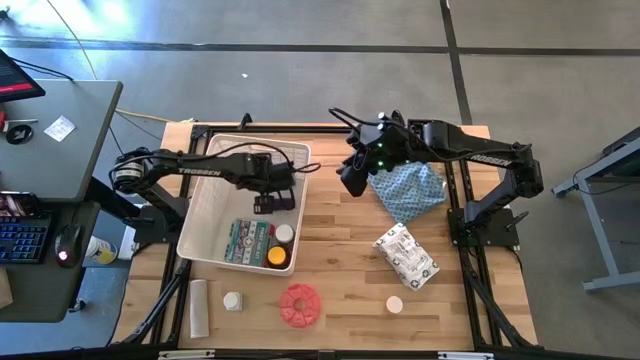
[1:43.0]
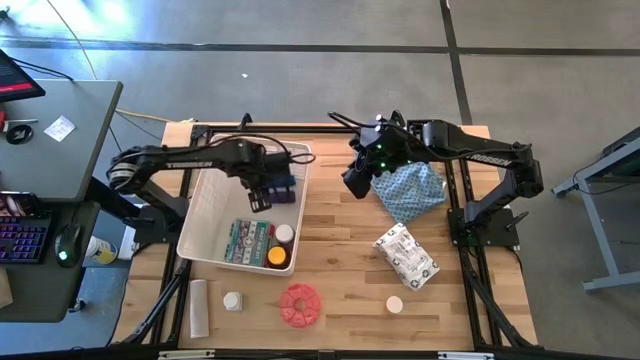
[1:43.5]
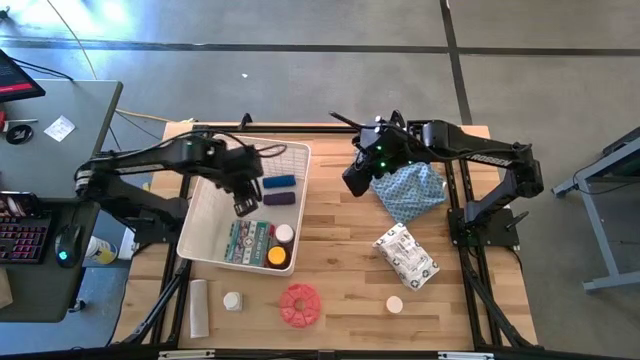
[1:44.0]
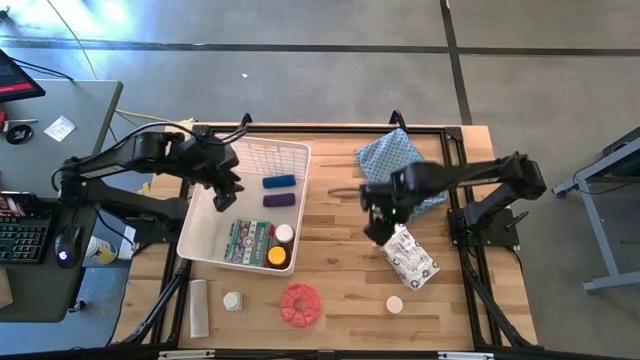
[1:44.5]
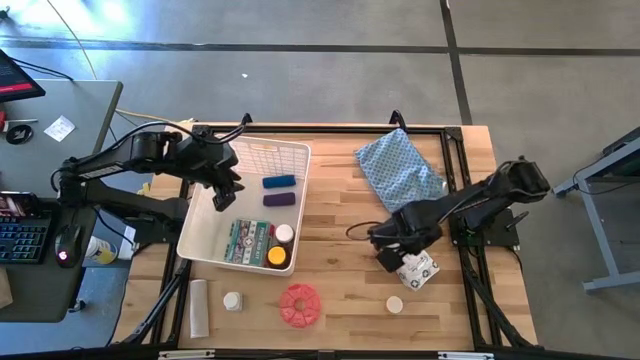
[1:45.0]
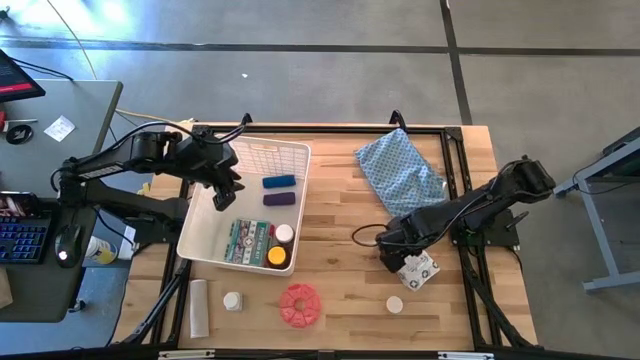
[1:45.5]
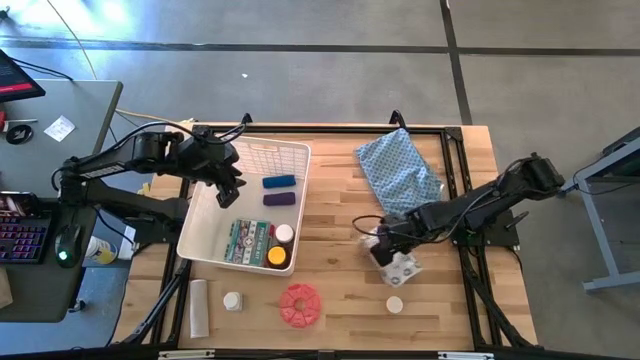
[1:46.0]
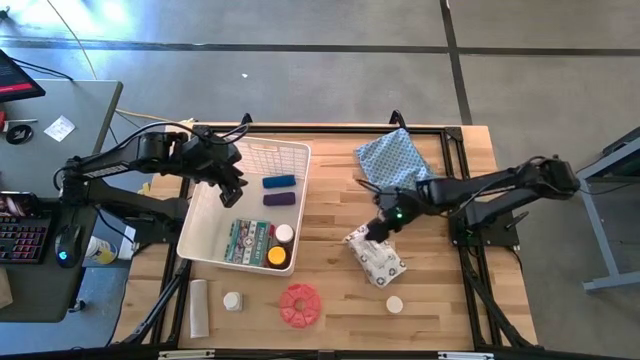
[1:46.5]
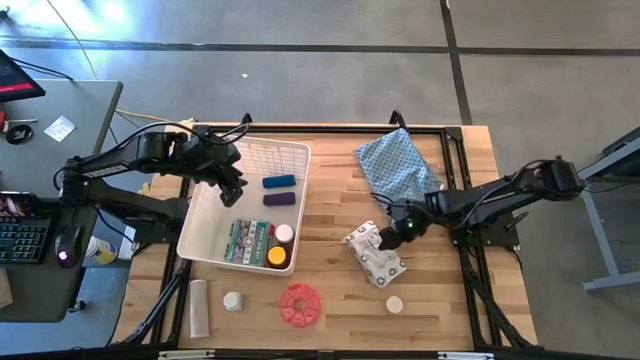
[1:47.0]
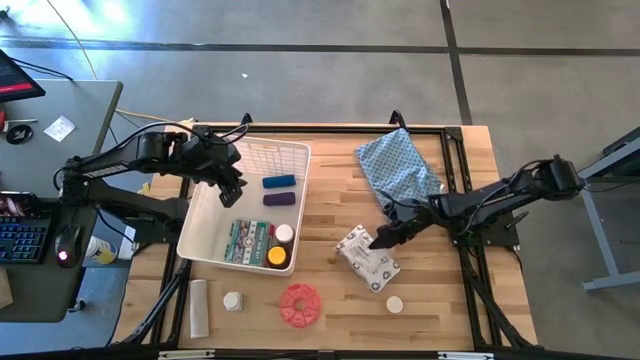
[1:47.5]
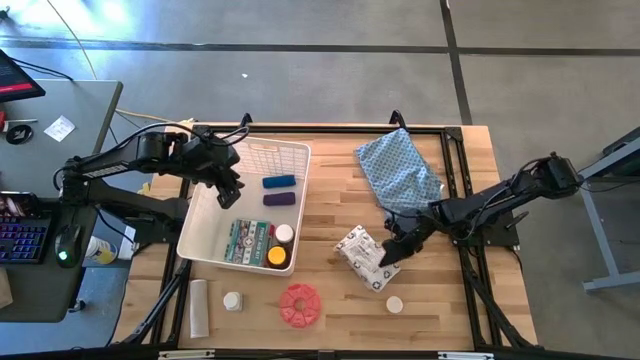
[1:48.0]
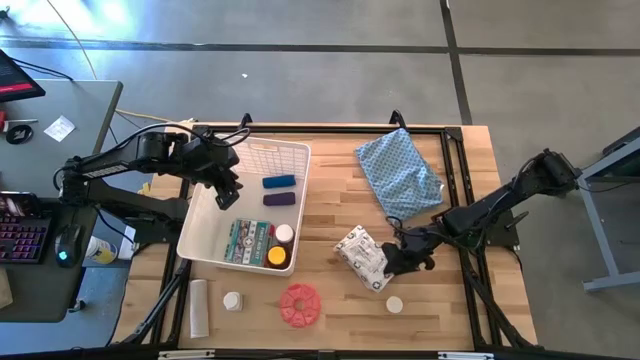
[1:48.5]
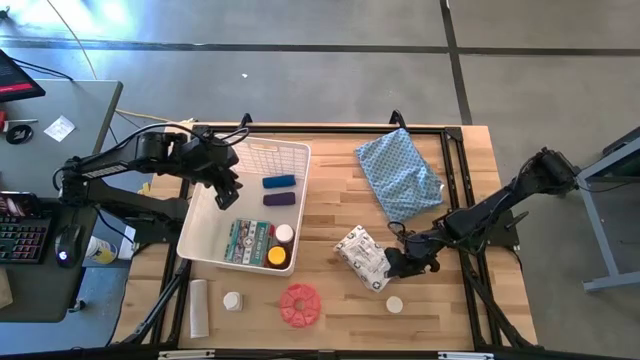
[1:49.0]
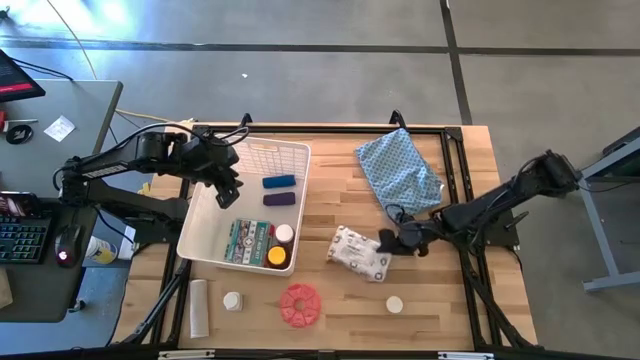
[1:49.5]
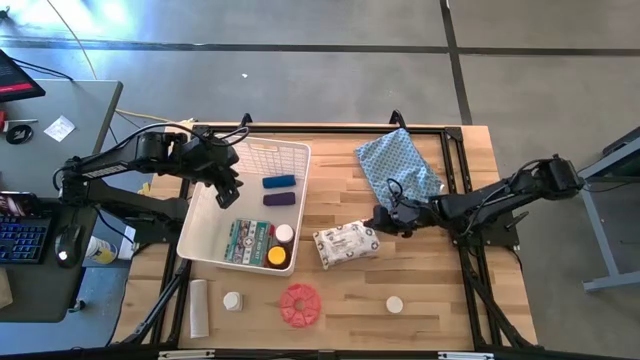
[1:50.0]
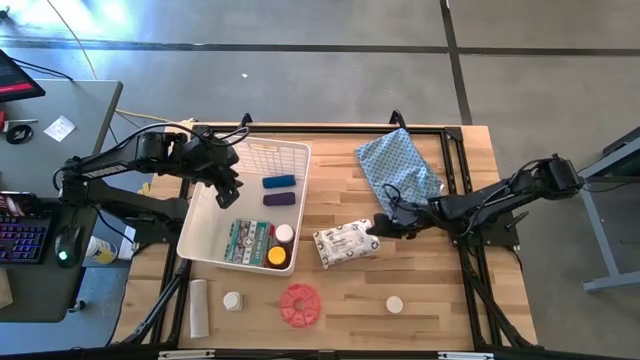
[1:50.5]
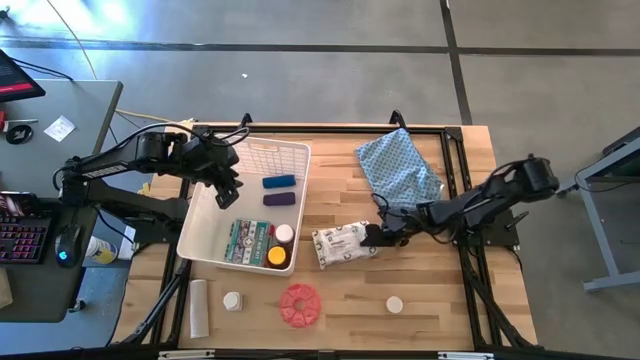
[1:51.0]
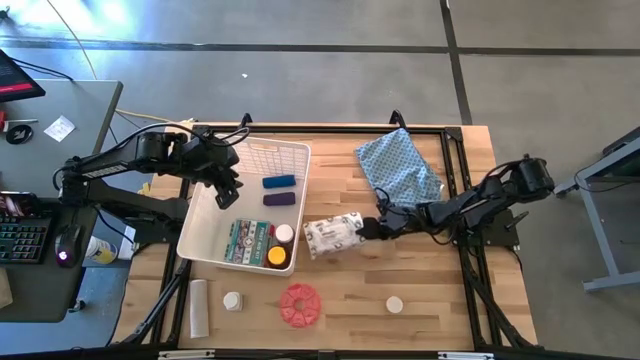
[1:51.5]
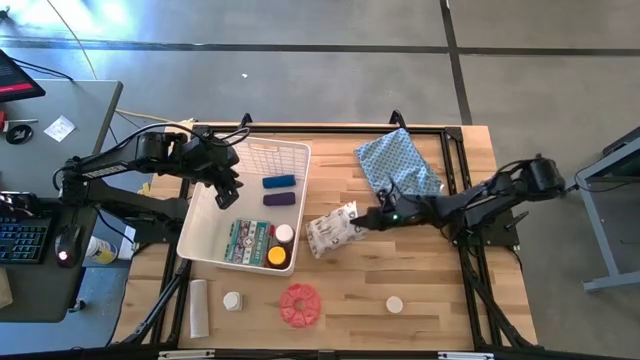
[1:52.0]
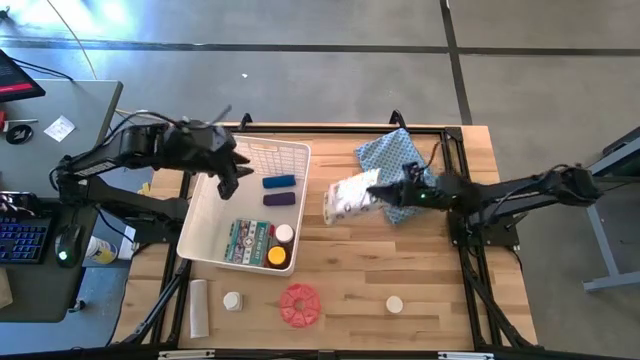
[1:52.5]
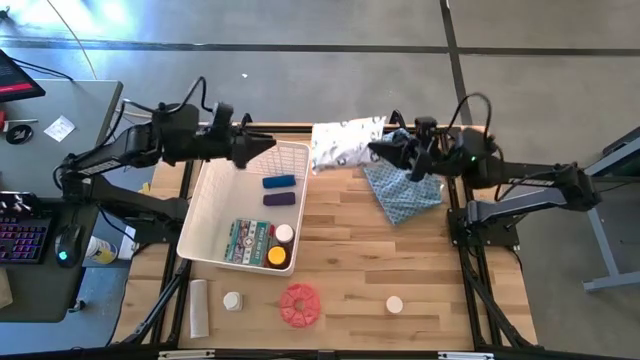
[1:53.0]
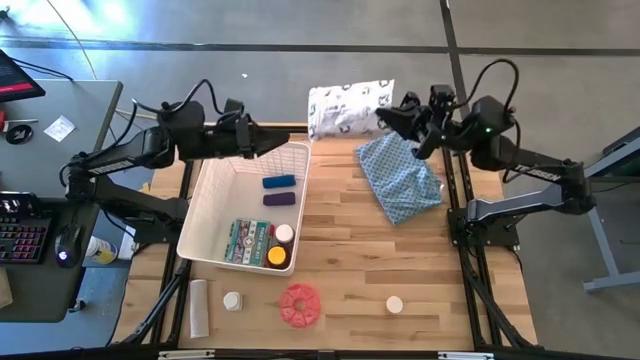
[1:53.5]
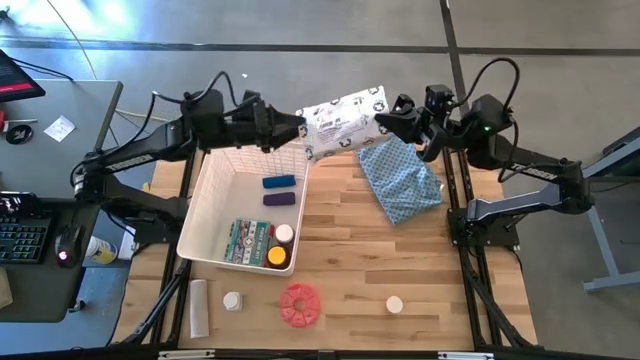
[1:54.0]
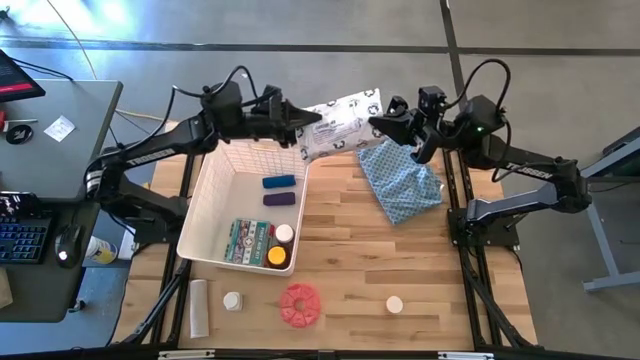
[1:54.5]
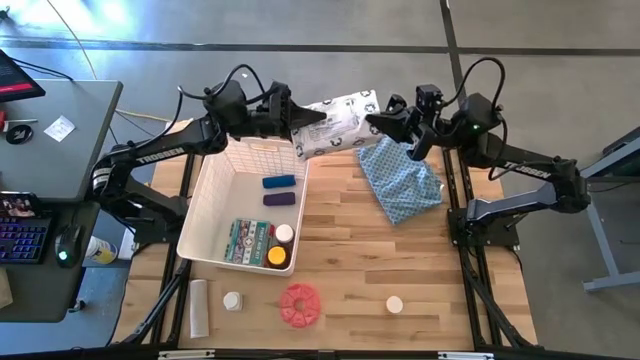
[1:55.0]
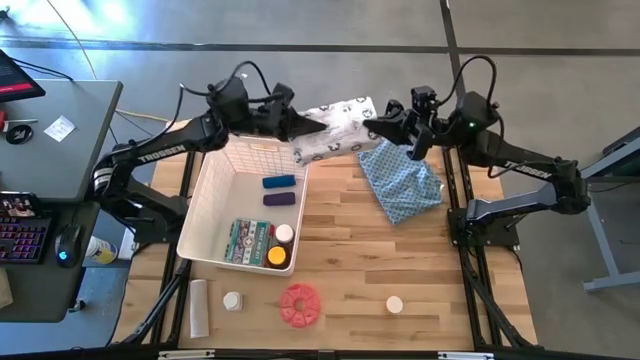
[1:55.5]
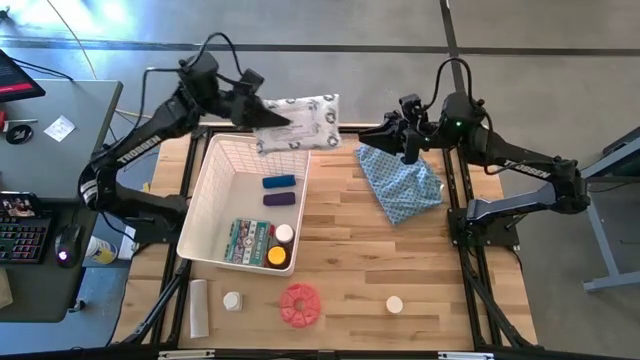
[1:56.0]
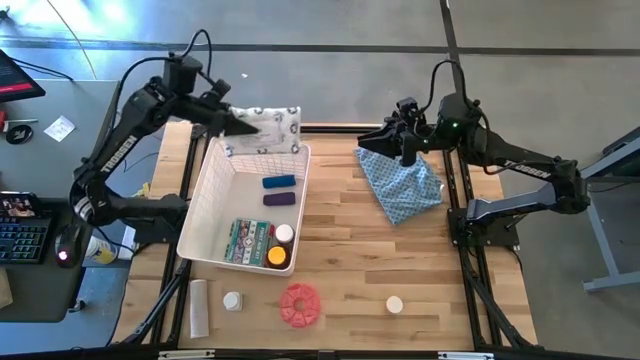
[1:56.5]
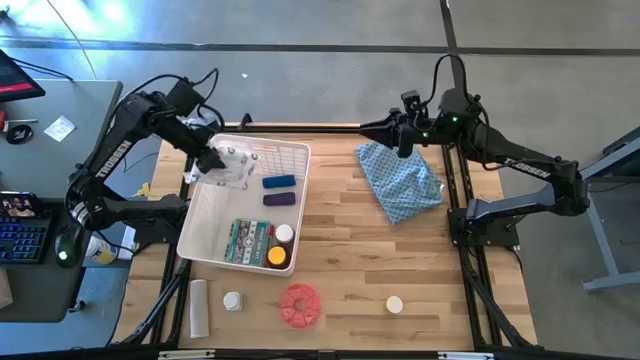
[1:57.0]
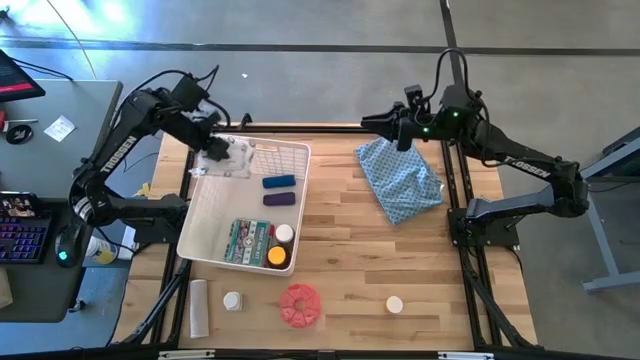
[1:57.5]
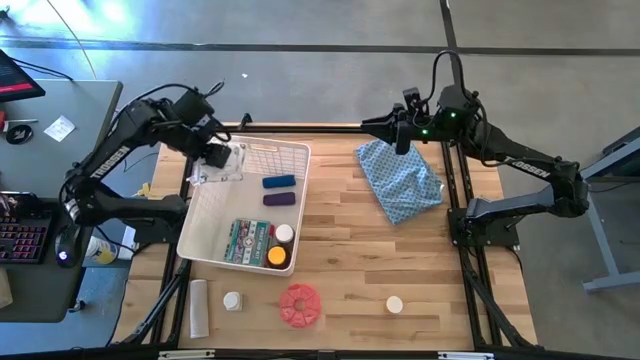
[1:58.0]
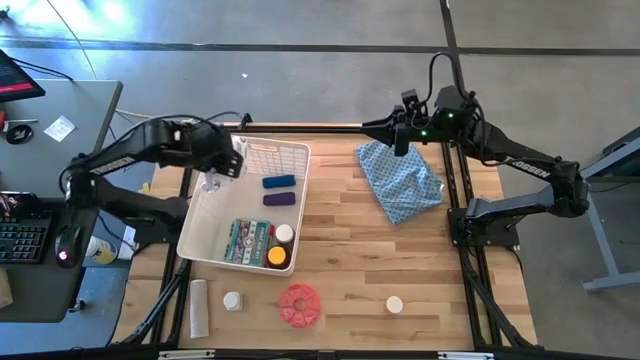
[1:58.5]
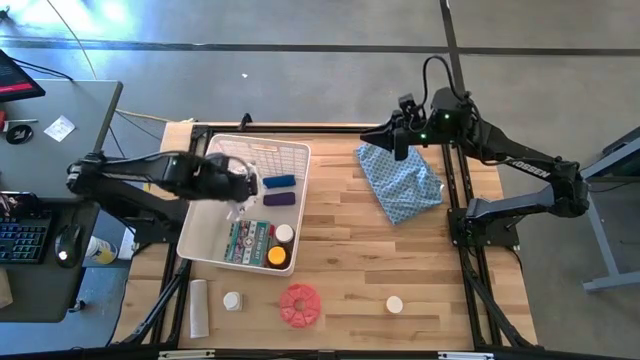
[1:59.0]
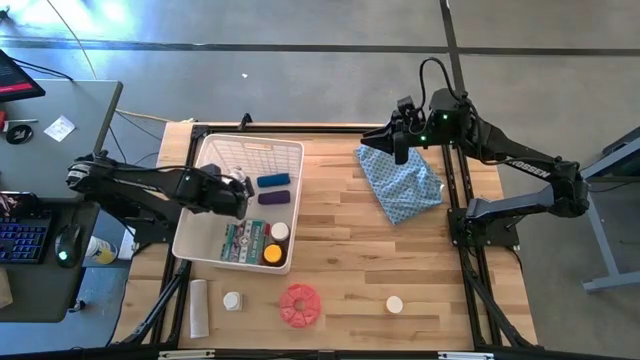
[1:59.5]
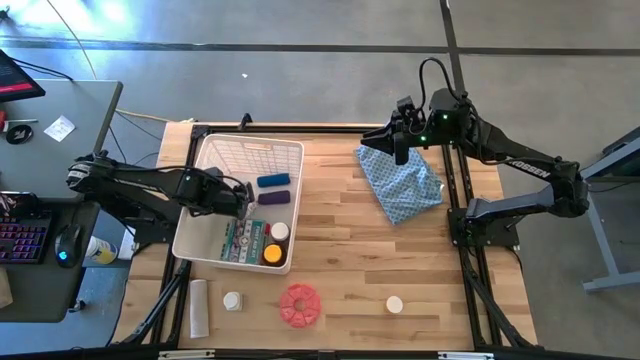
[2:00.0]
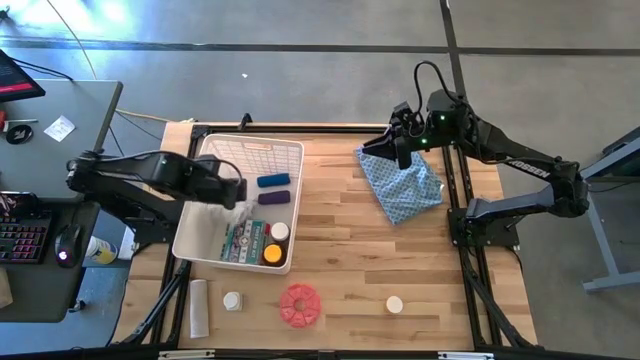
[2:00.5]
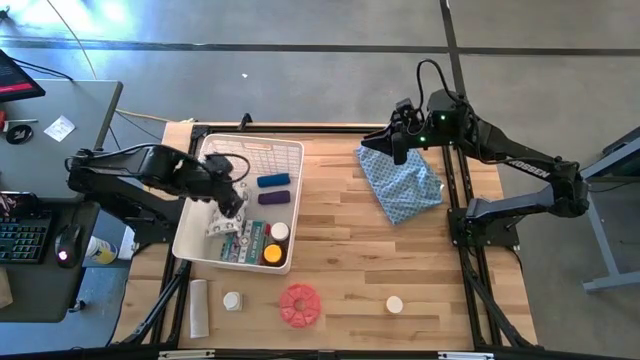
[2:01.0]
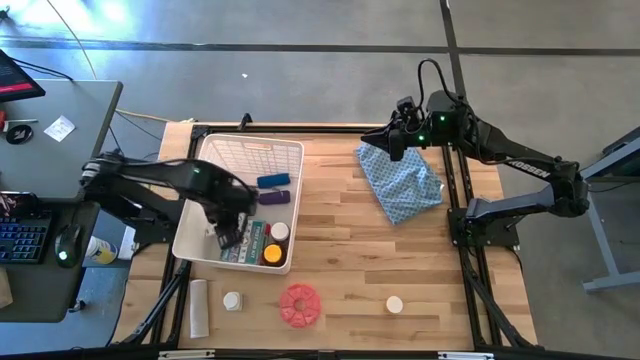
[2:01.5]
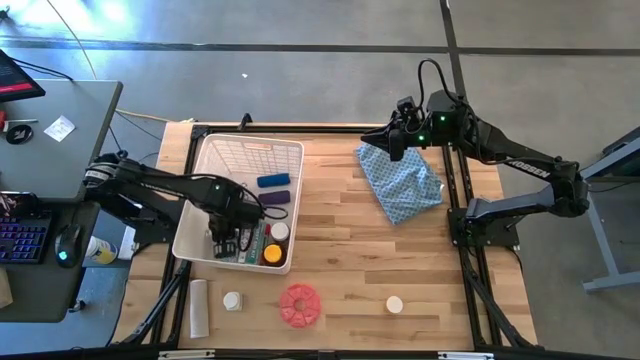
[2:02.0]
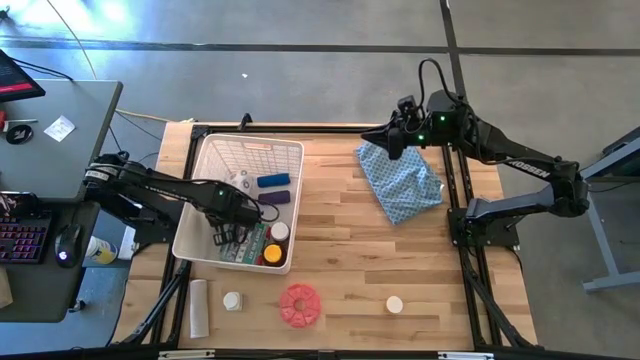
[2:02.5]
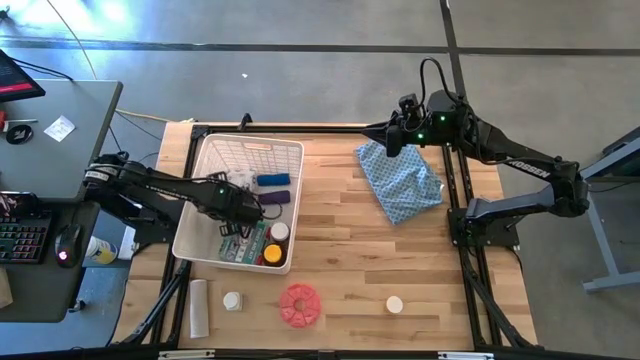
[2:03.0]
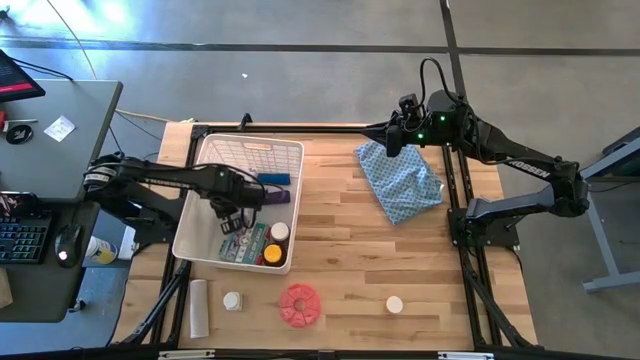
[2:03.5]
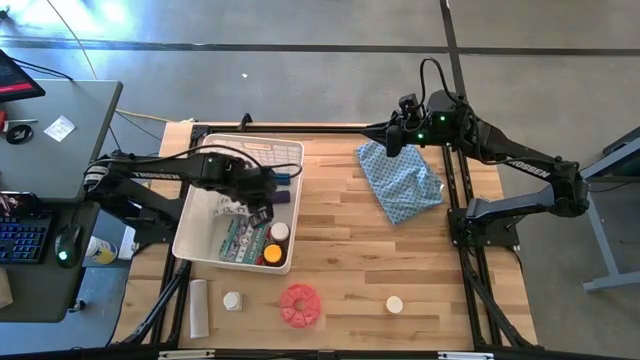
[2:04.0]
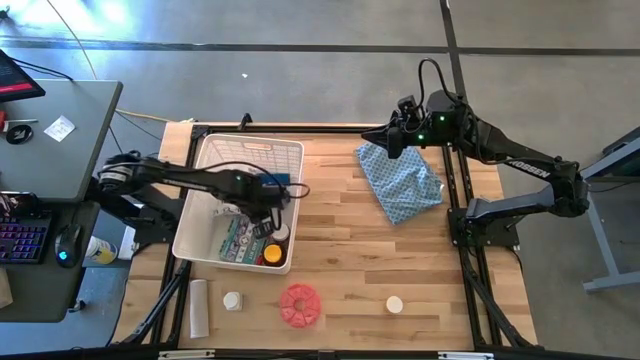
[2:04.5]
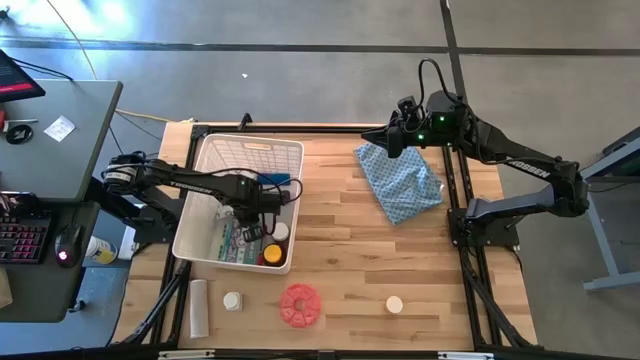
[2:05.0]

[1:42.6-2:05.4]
Task: Pick & place medical supplies in basket/bin
Put the white mailer bag into the white bin
